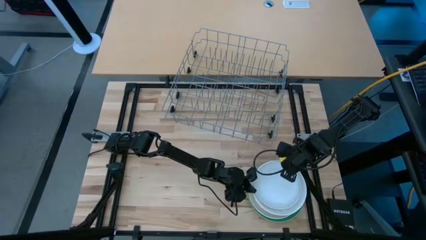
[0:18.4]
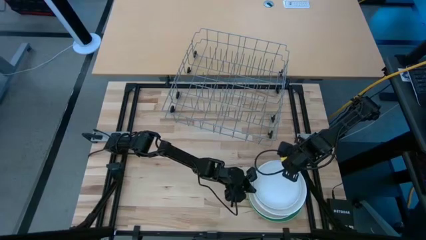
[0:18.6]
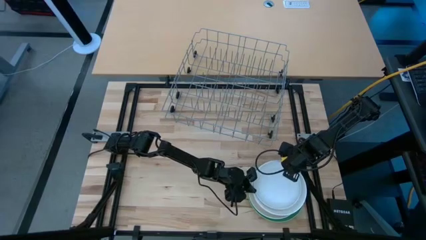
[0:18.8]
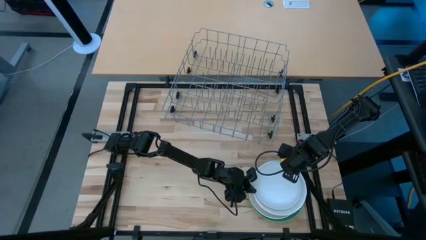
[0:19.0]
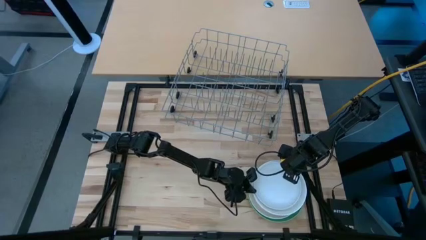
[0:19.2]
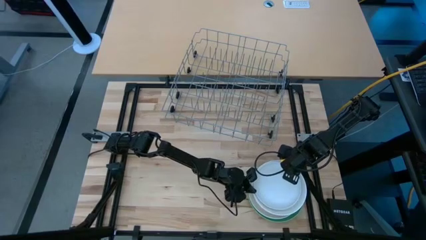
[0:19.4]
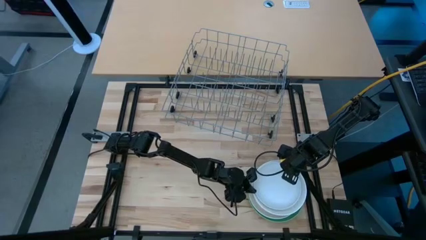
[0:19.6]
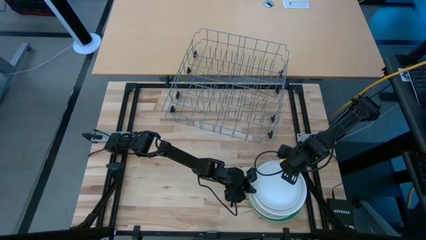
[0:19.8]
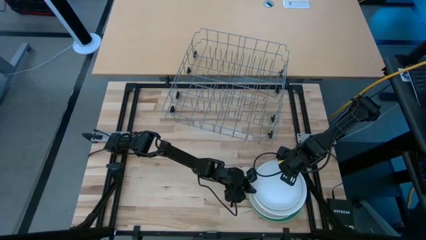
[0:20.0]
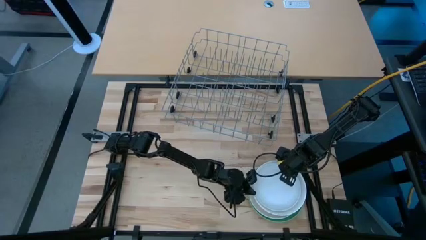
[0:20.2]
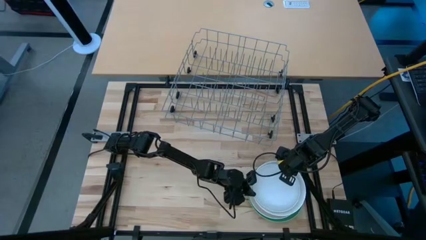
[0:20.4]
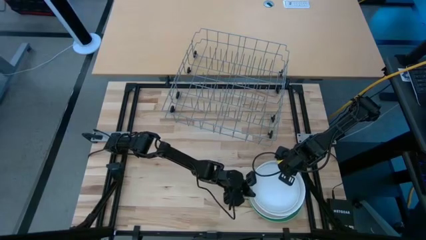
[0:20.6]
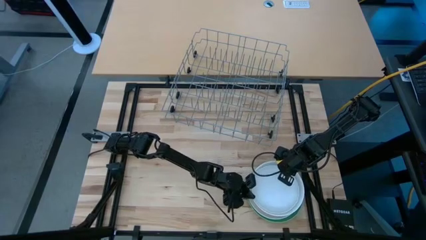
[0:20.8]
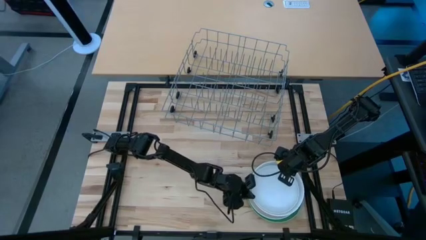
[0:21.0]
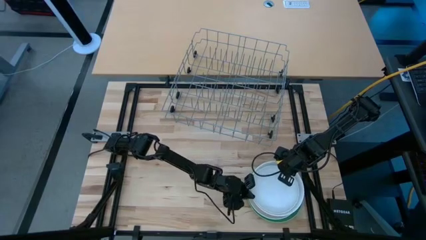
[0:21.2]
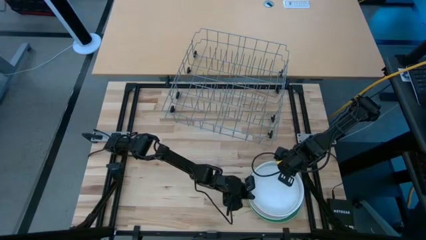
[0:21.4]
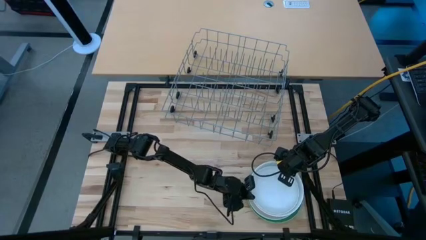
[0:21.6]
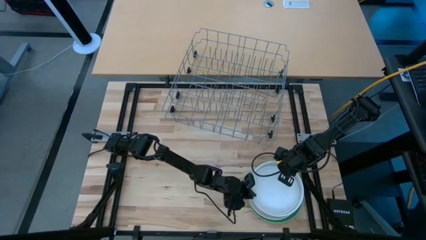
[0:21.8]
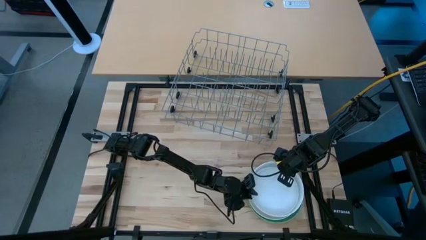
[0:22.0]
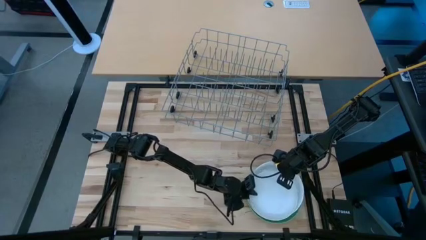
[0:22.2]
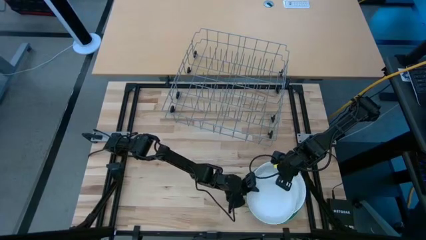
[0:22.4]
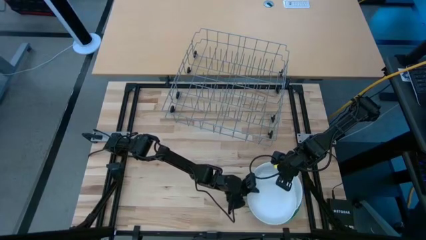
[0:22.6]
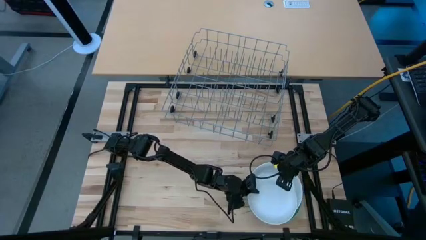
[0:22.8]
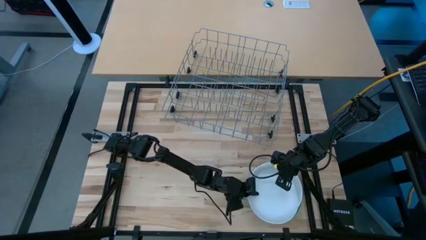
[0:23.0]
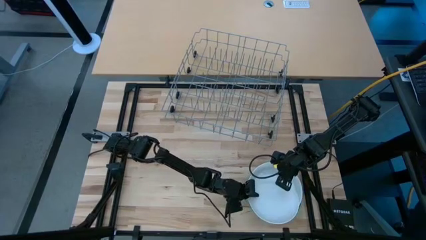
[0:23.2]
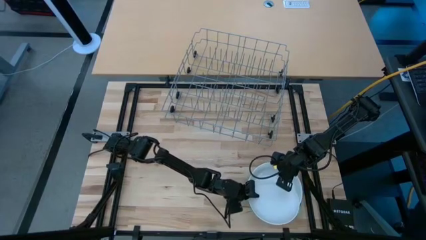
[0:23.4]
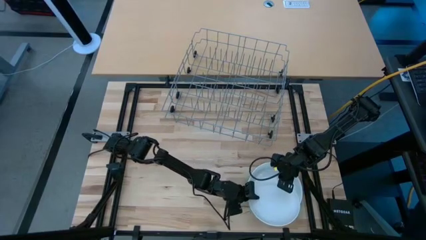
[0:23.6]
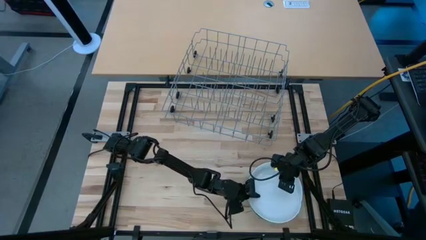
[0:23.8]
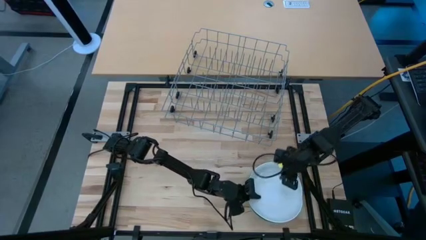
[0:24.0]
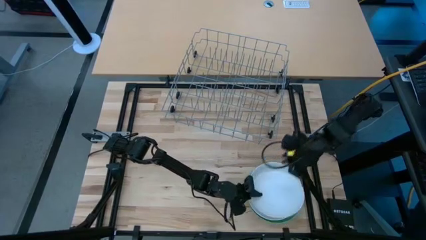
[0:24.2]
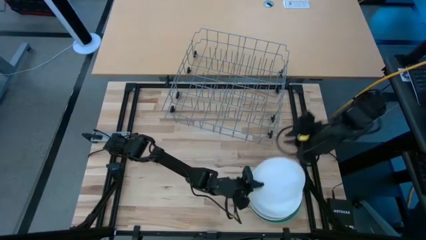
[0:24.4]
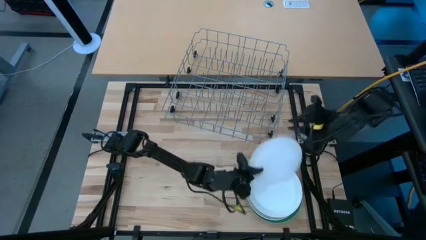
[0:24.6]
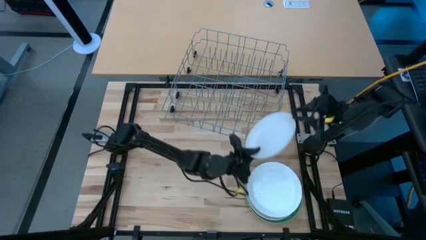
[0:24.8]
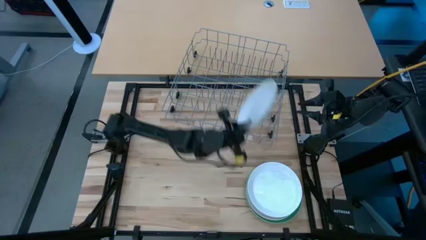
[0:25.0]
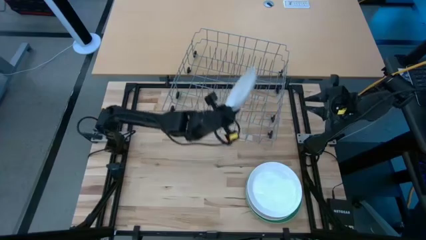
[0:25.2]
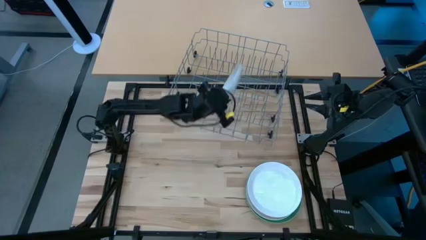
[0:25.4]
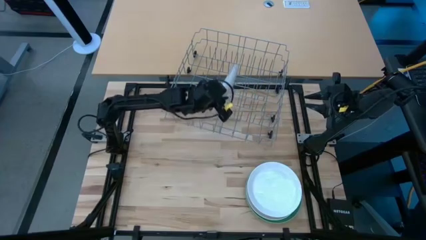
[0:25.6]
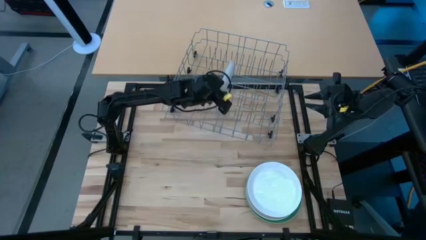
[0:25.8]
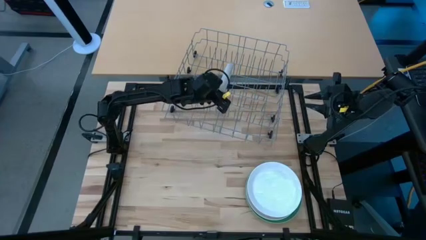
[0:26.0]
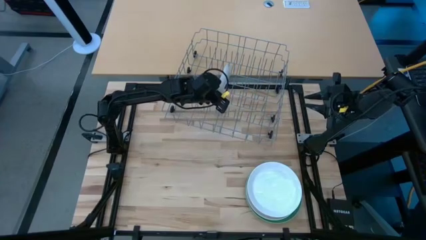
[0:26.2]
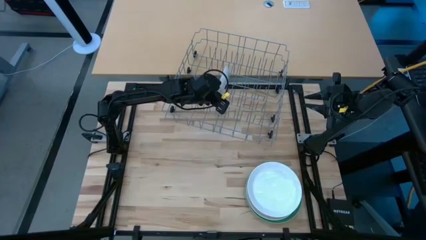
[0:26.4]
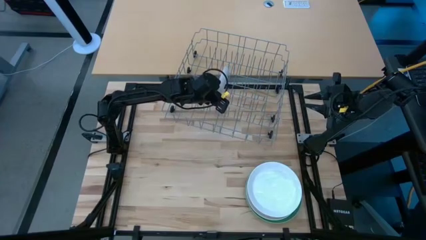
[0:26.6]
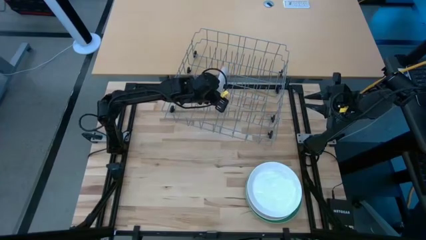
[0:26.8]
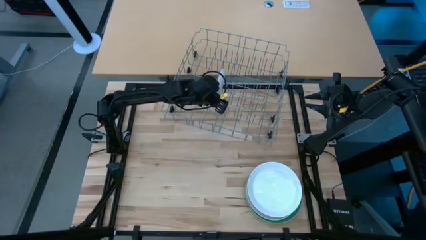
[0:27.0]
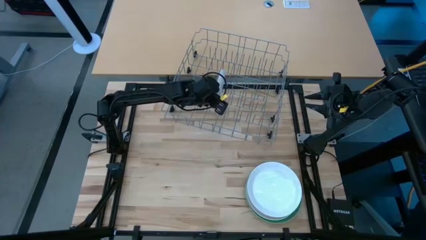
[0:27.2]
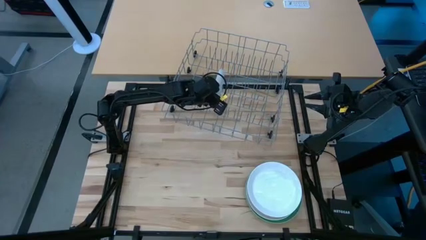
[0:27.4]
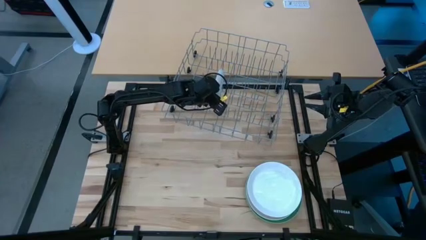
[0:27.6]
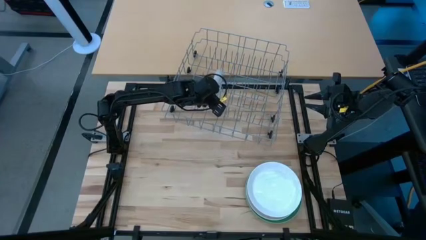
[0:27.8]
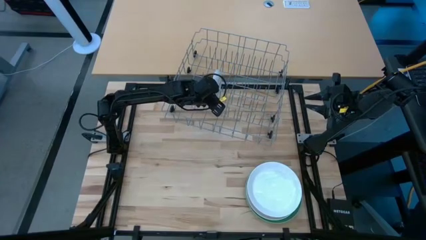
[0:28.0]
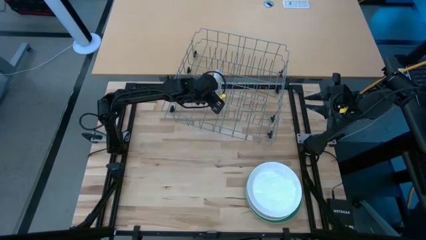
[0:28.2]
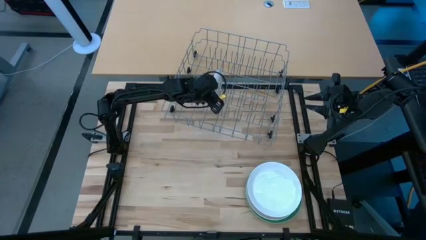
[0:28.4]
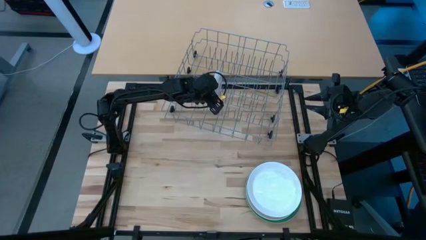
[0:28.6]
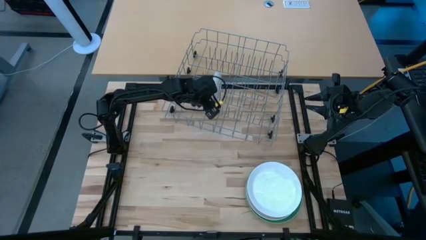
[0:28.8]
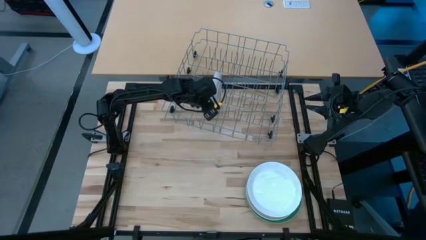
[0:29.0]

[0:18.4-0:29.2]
Task: Sort dishes
Put the white plate into the gray dishwasher rack
